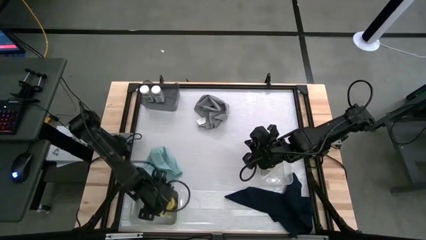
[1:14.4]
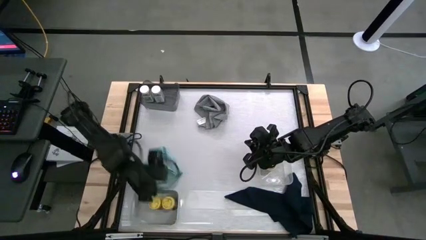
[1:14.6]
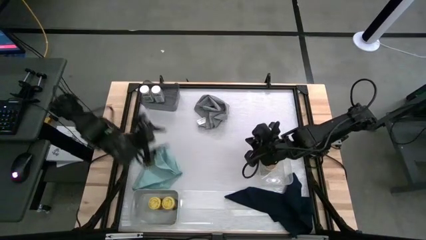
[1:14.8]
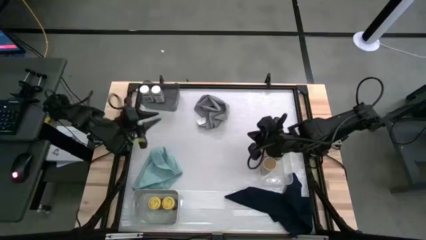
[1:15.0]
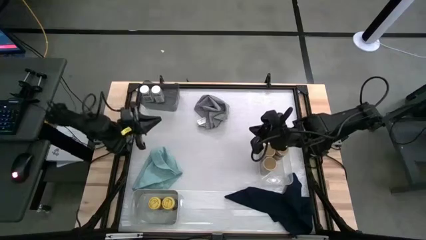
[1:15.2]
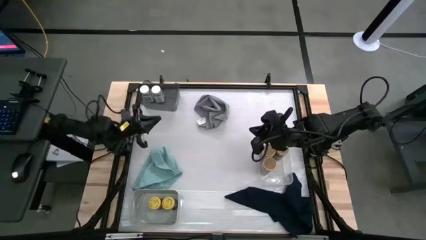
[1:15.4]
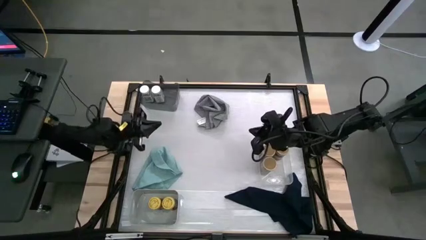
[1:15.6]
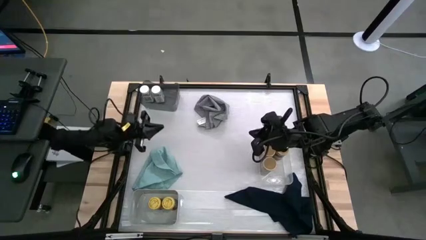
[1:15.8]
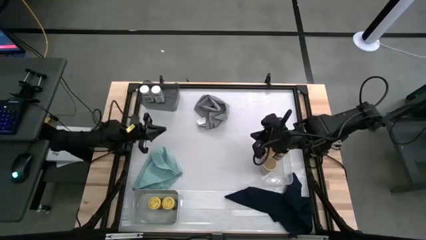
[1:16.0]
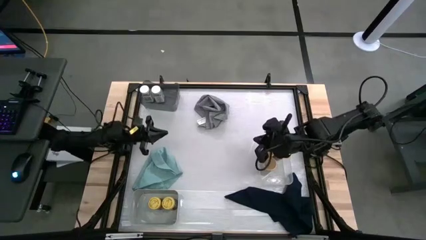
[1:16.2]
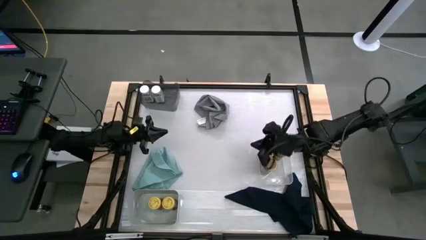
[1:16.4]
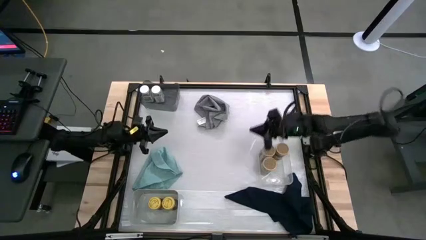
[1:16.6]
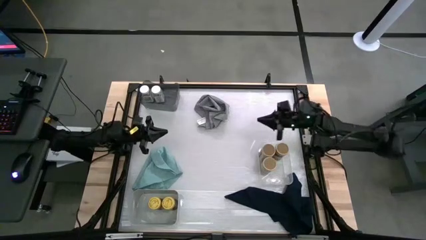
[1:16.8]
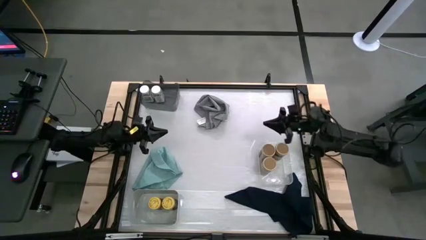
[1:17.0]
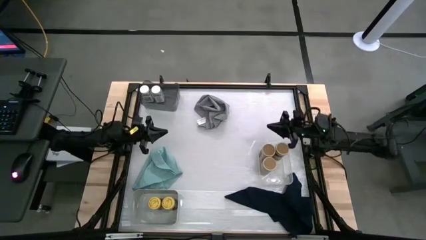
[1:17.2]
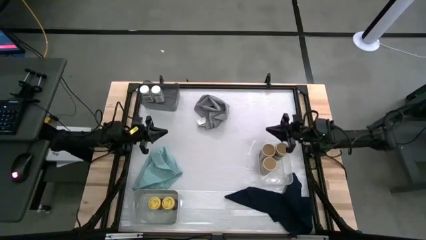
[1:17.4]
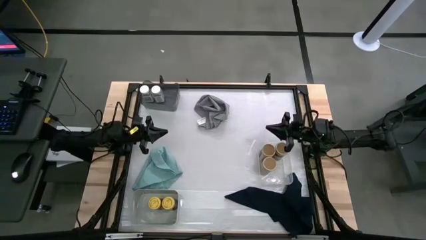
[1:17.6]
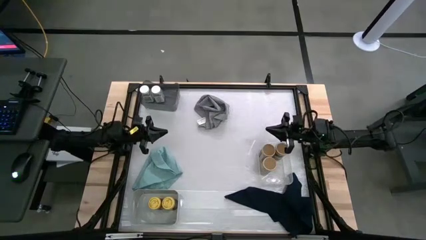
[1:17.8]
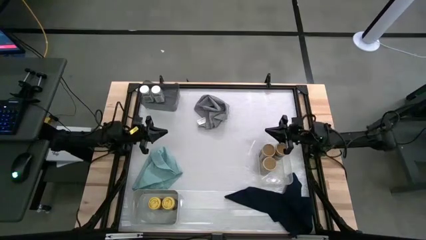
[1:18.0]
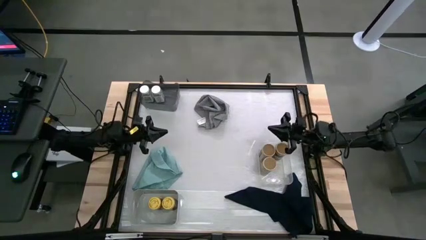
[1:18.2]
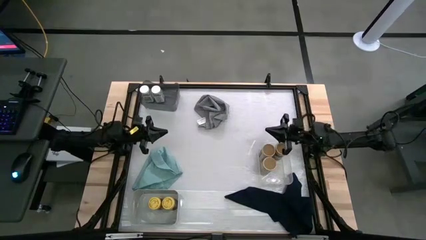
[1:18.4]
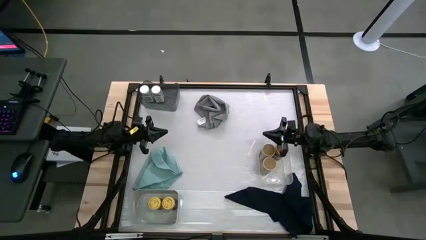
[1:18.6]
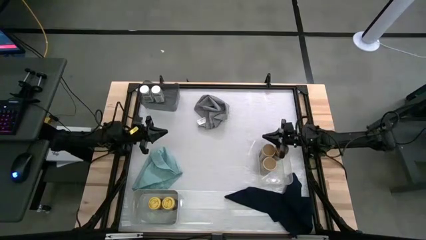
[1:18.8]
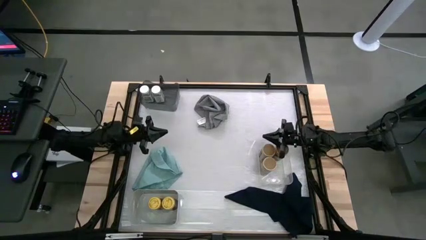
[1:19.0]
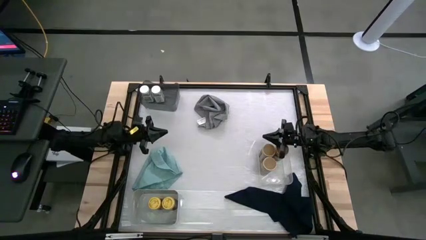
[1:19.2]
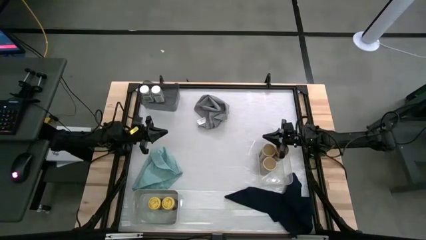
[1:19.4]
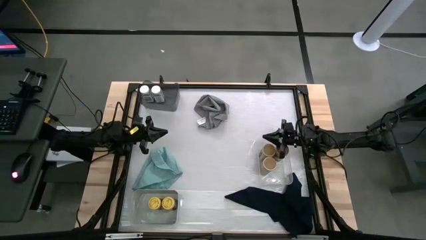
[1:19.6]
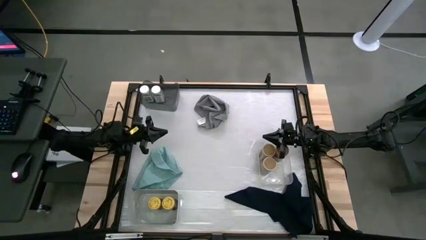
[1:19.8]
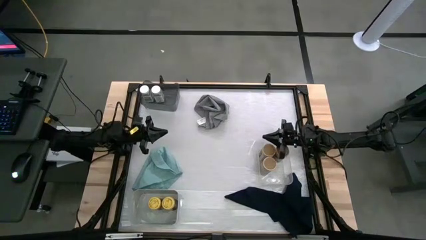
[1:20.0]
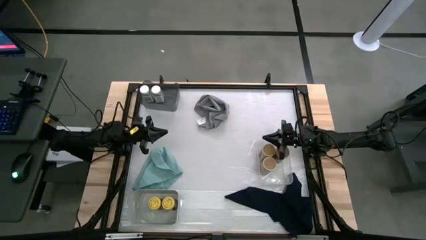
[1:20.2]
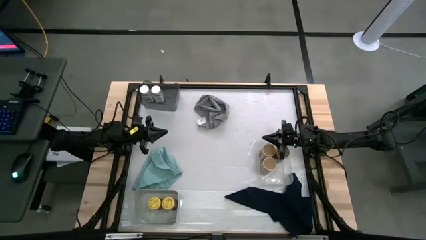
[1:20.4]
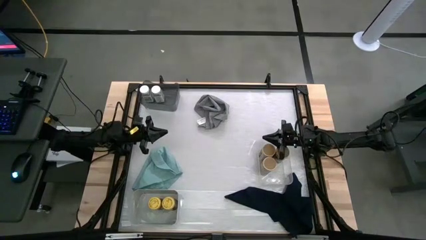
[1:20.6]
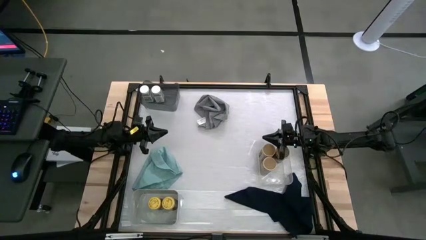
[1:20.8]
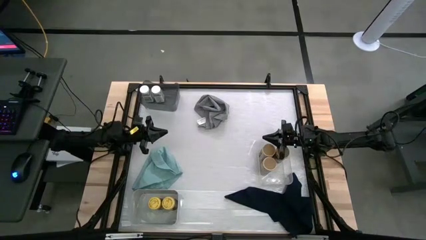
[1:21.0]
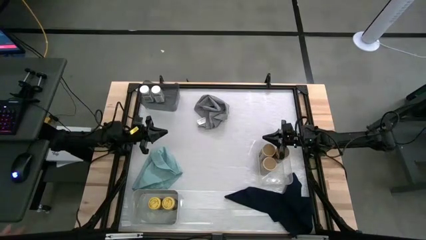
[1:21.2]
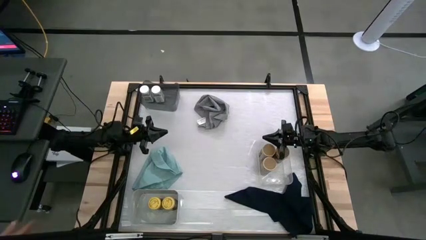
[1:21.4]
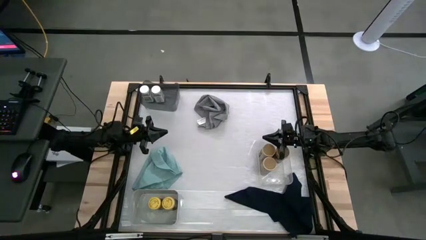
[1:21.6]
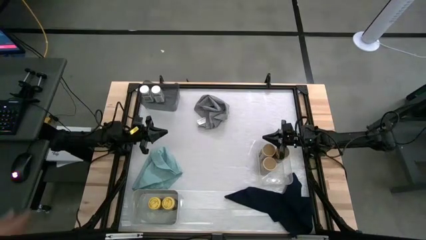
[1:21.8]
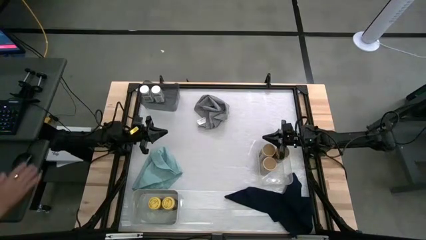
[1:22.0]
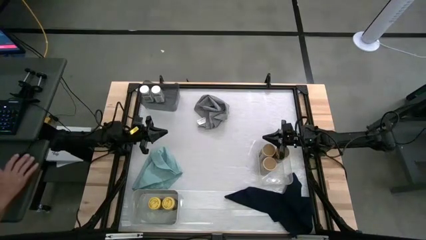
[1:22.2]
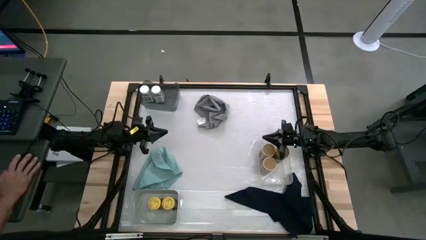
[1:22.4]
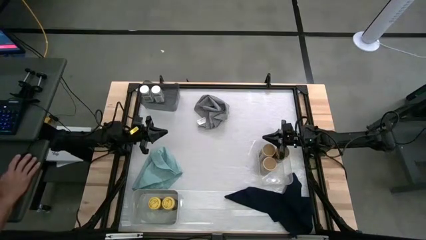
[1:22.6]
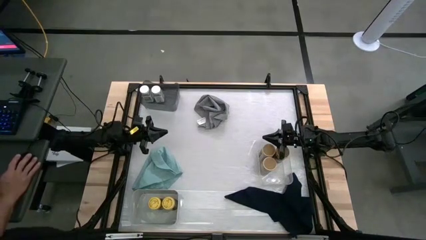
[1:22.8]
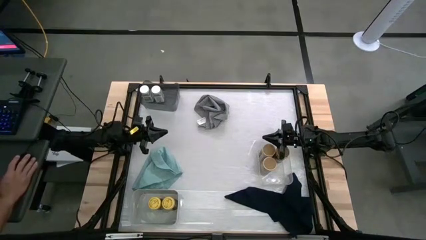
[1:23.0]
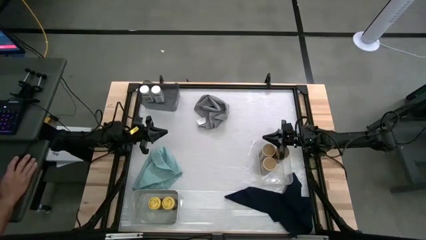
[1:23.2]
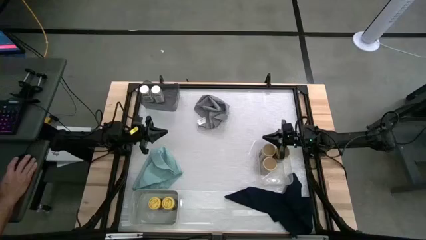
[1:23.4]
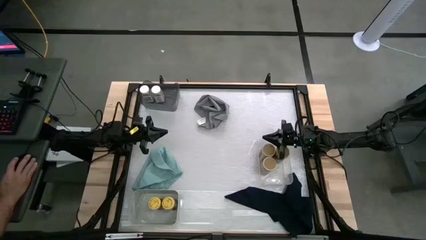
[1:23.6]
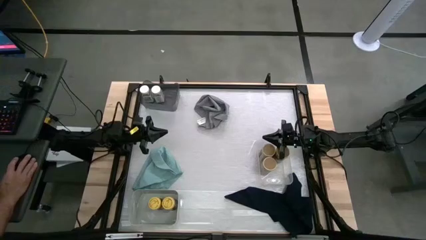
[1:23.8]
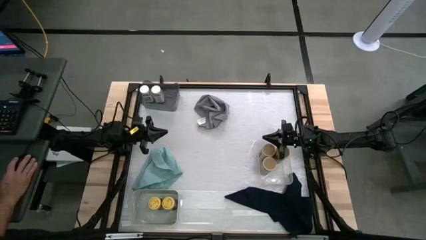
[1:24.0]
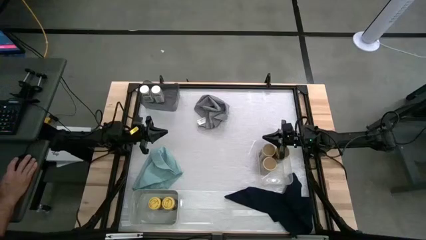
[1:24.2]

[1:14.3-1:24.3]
Task: Sort spices by type
Return to Home Position

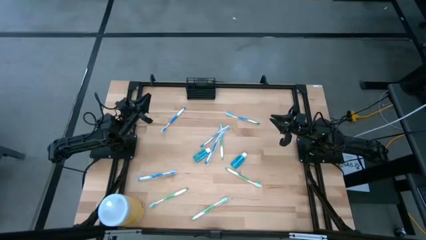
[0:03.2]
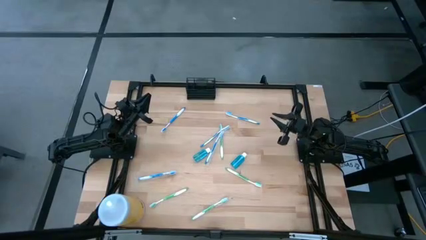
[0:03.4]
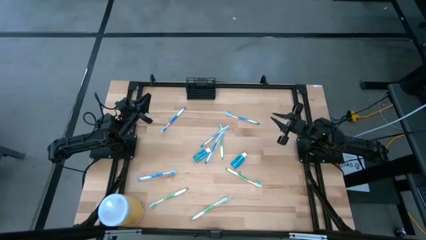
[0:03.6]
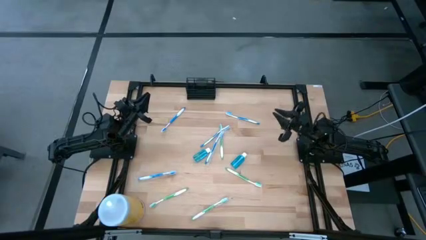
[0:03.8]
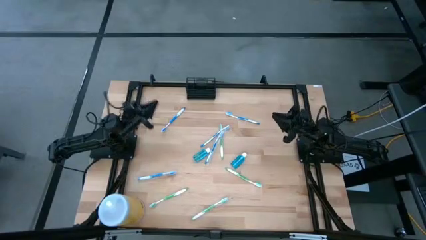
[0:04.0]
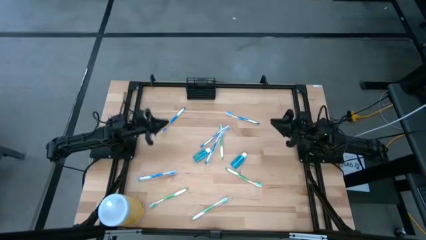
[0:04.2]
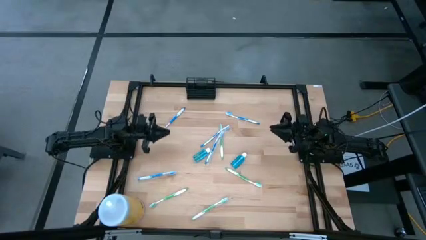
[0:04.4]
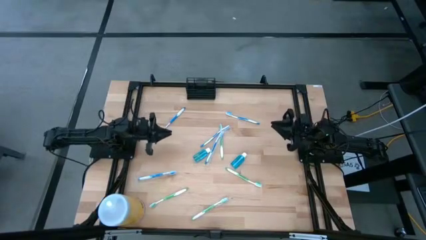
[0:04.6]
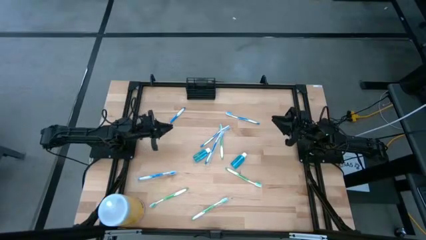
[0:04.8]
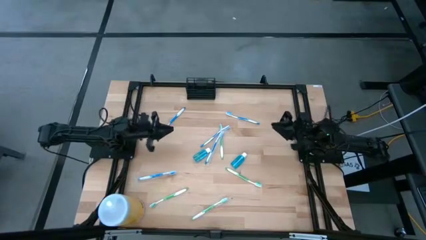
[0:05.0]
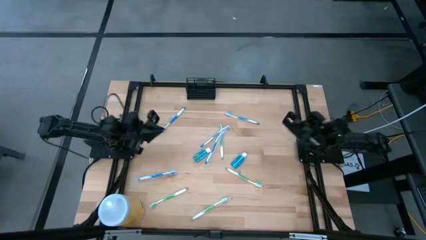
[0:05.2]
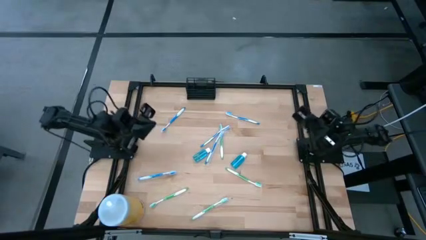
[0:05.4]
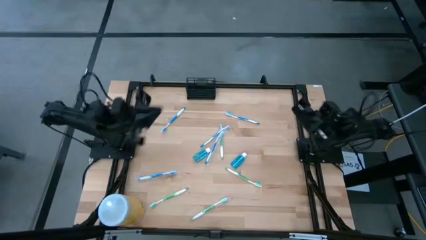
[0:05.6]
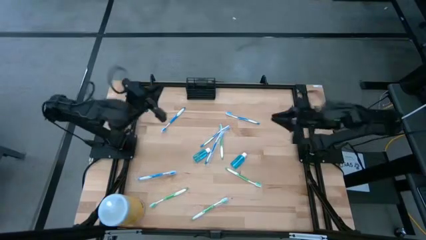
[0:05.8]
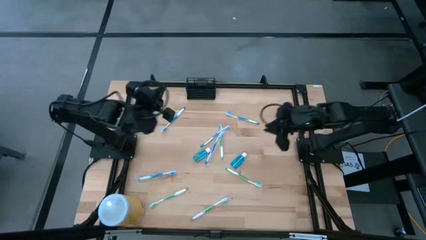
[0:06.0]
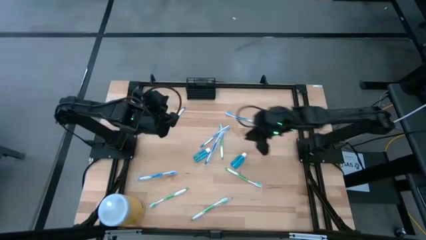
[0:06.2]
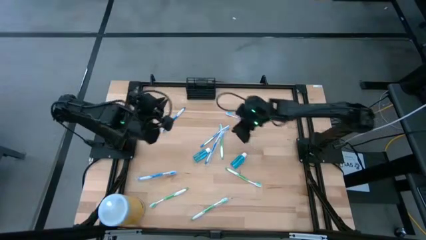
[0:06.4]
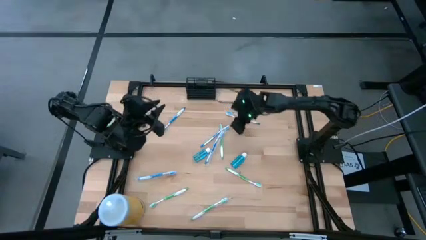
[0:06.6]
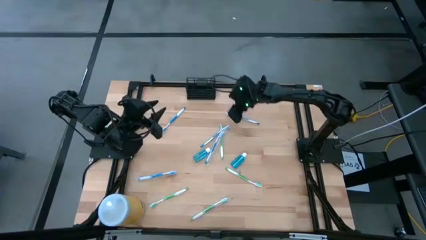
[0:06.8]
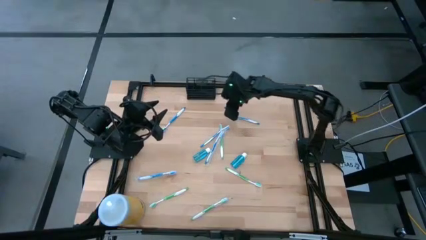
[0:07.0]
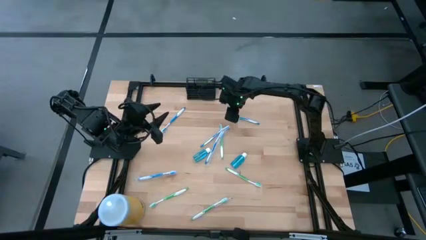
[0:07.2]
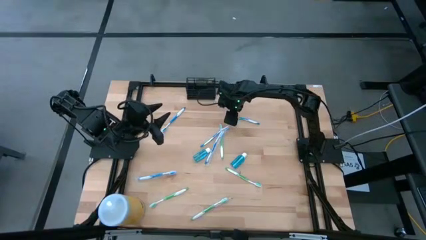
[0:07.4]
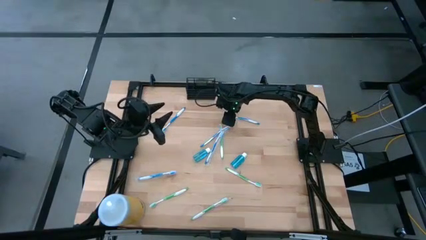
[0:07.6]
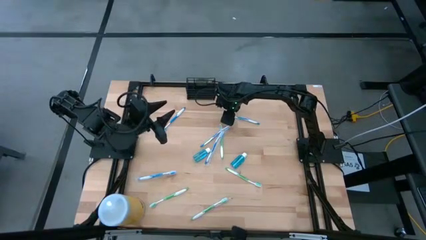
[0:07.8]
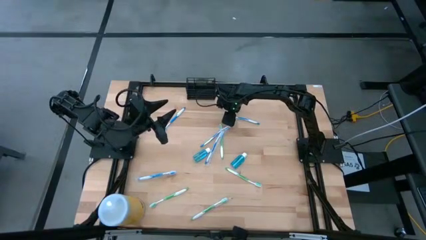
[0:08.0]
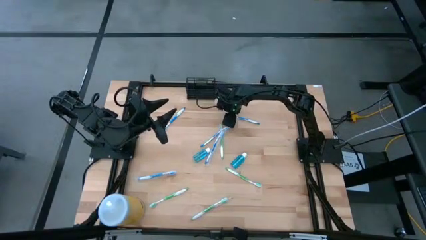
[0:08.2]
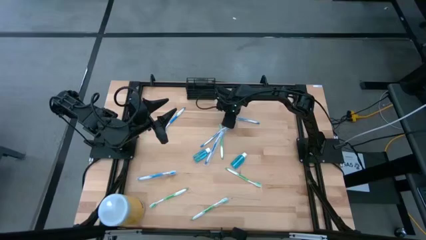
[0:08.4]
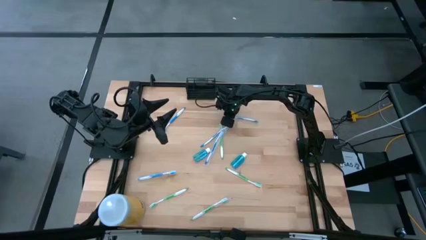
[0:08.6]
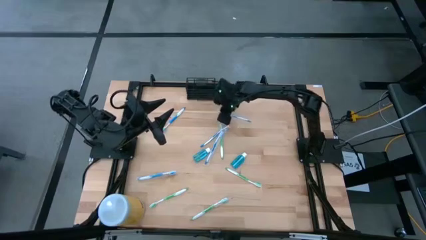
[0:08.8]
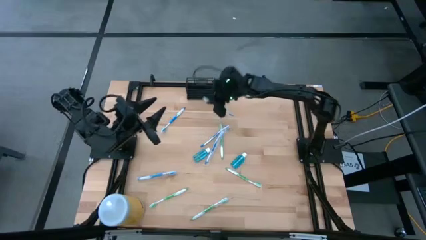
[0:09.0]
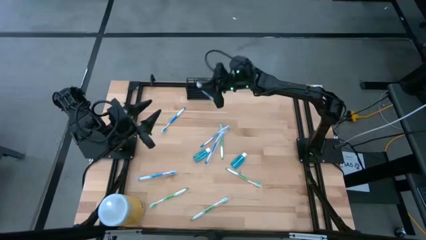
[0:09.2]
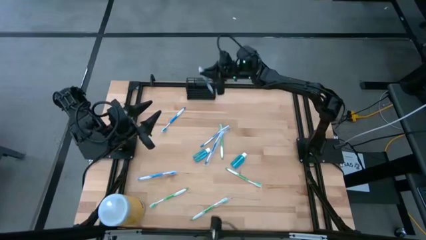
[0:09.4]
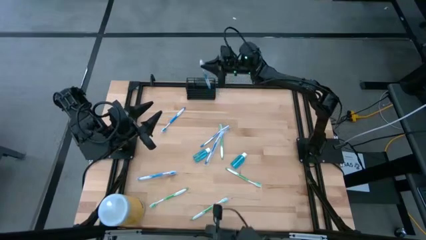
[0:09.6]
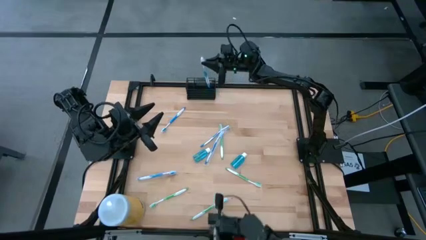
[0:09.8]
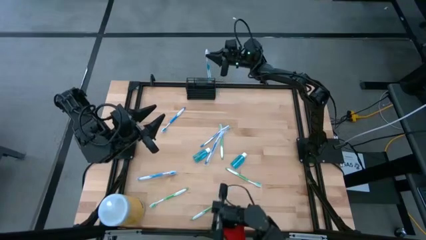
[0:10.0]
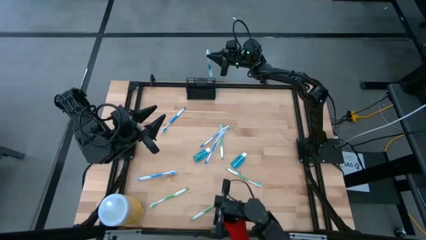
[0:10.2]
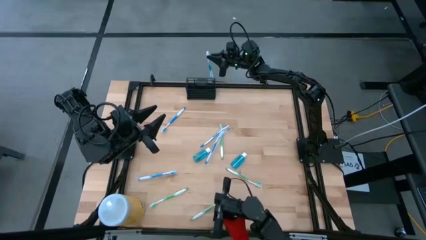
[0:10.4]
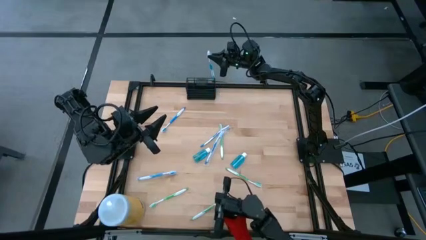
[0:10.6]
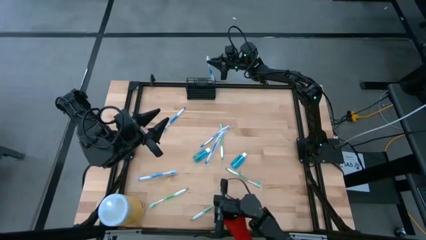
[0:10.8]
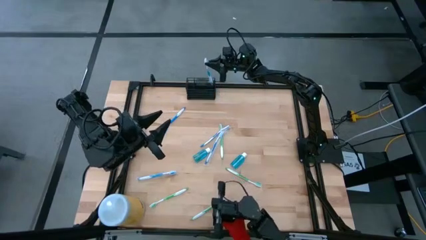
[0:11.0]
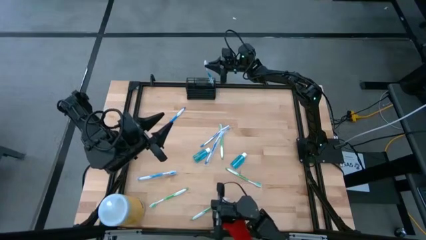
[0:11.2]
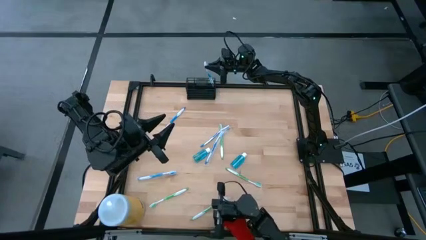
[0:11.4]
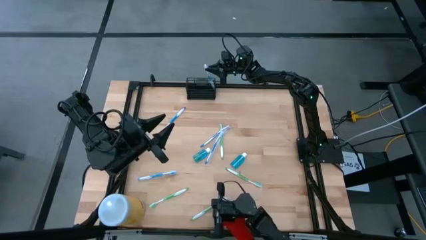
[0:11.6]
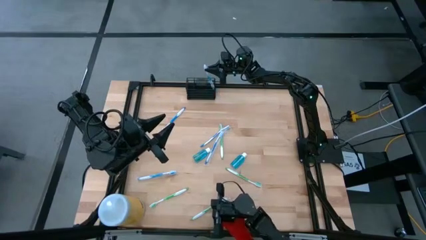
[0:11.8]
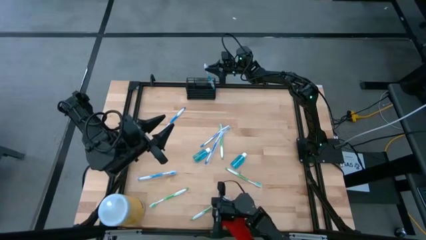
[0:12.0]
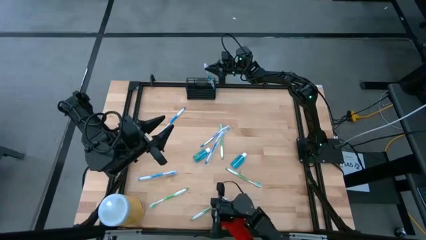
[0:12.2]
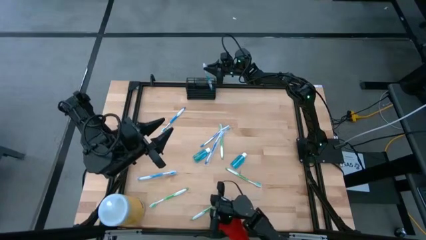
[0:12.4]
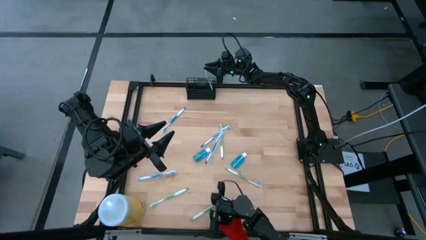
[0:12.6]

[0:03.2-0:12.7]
Task: Pick & Place toothbrushing station
Put the blue toothbrush into the wire organizer
